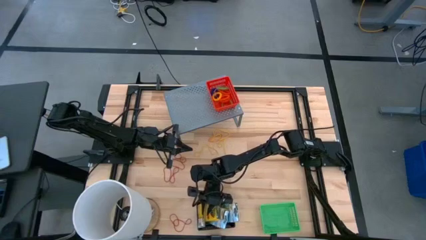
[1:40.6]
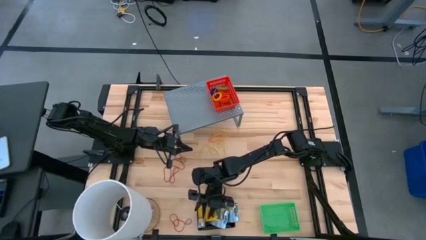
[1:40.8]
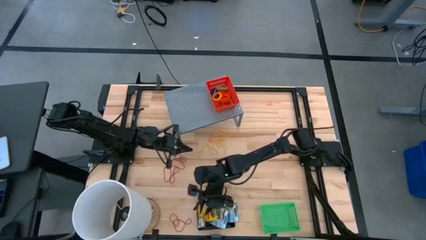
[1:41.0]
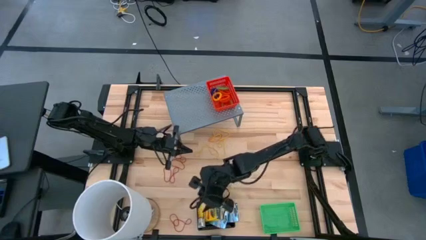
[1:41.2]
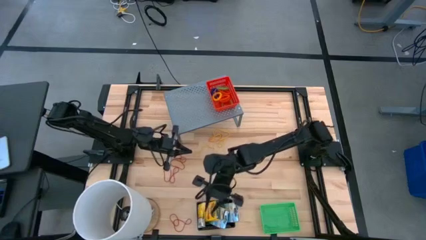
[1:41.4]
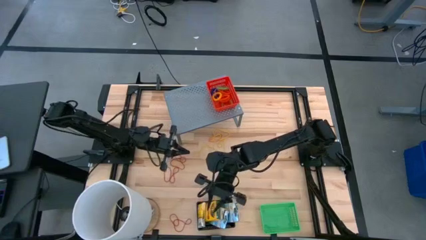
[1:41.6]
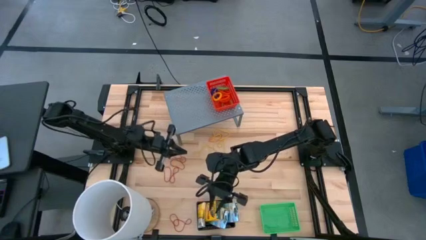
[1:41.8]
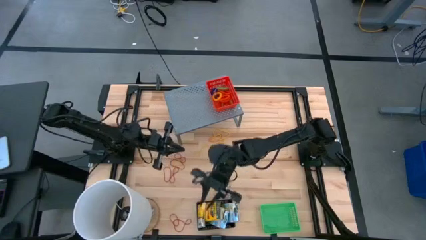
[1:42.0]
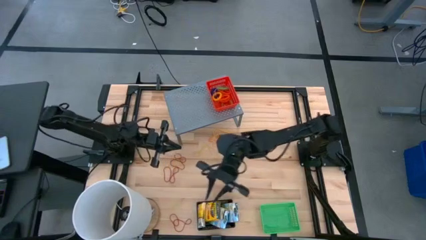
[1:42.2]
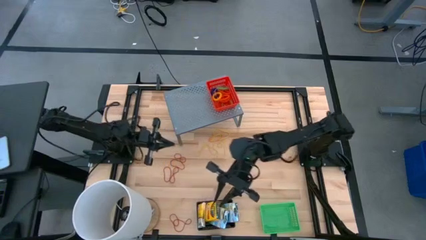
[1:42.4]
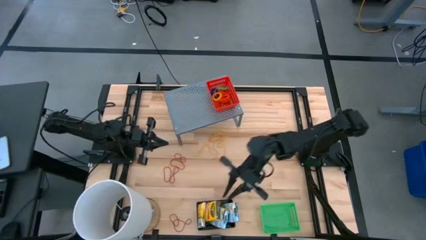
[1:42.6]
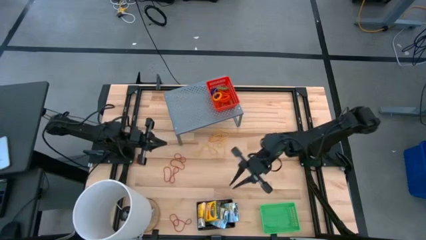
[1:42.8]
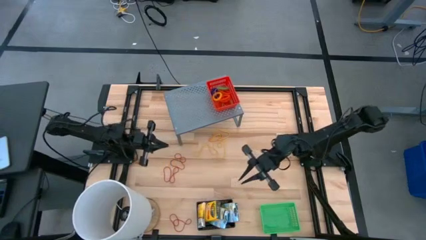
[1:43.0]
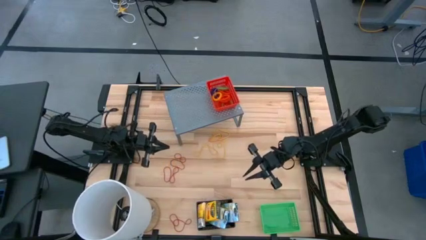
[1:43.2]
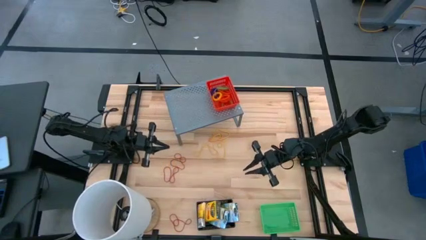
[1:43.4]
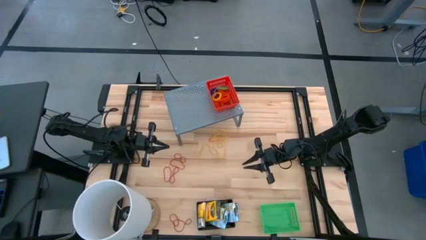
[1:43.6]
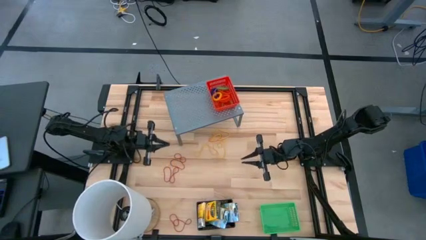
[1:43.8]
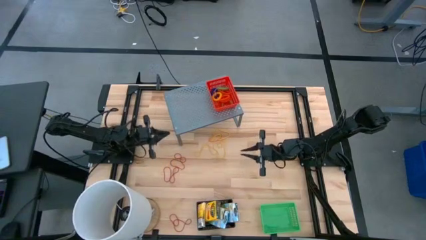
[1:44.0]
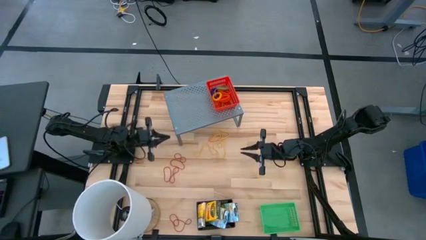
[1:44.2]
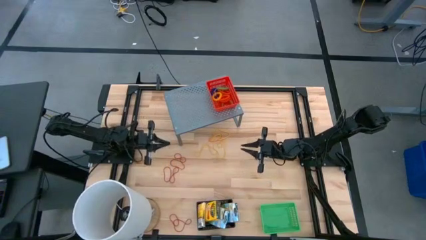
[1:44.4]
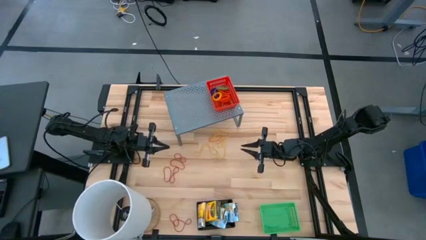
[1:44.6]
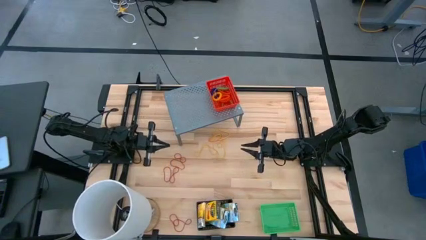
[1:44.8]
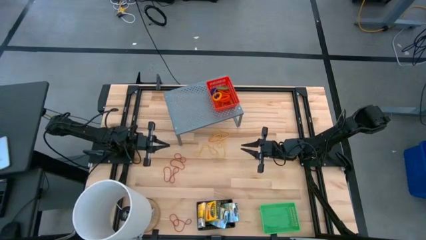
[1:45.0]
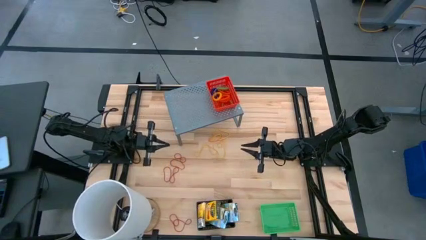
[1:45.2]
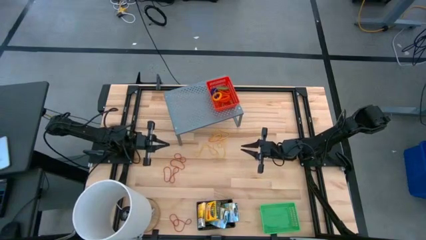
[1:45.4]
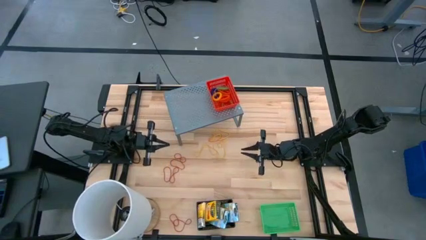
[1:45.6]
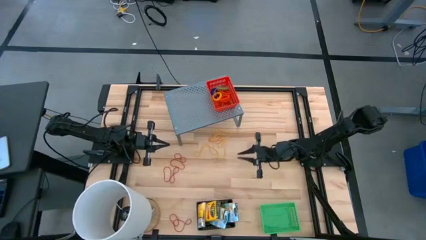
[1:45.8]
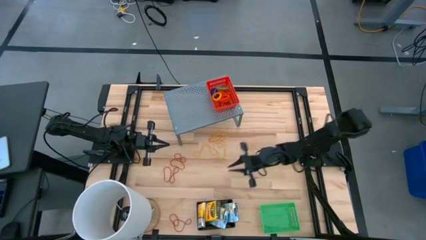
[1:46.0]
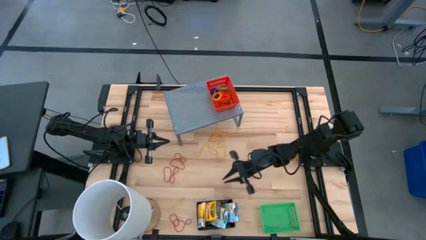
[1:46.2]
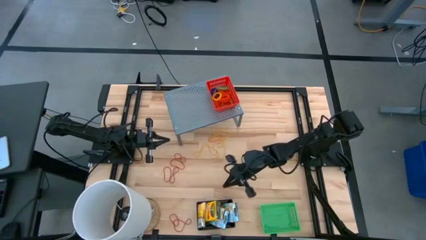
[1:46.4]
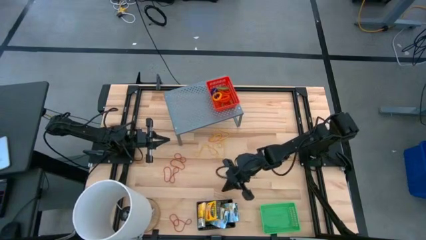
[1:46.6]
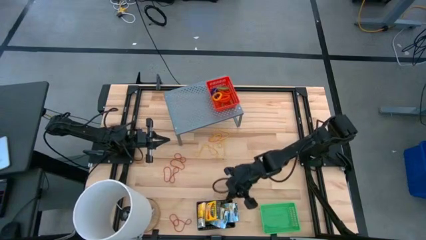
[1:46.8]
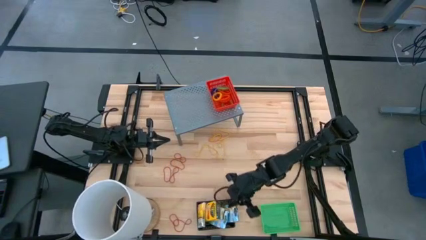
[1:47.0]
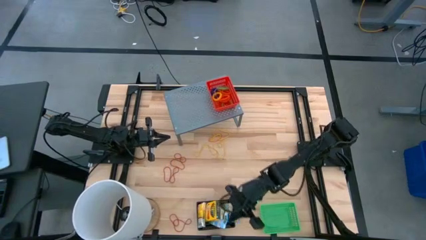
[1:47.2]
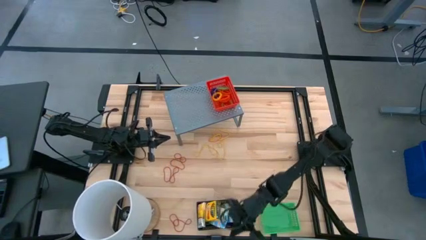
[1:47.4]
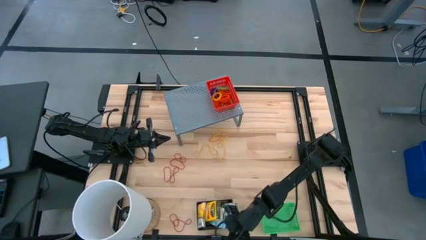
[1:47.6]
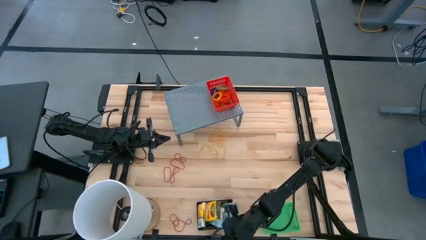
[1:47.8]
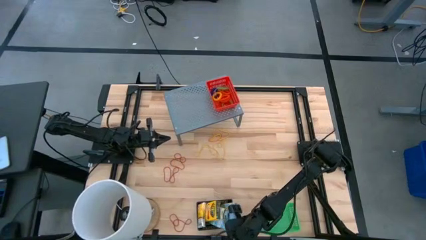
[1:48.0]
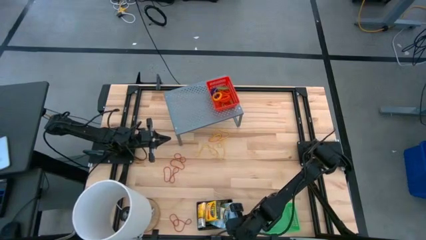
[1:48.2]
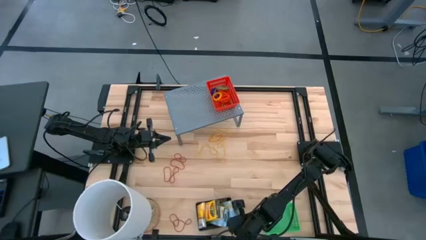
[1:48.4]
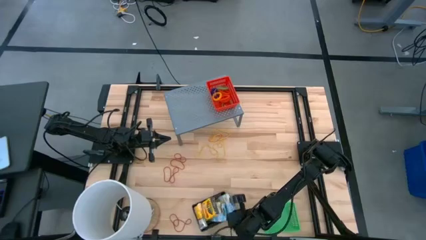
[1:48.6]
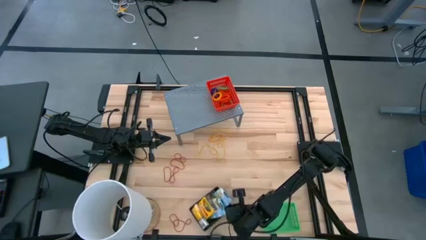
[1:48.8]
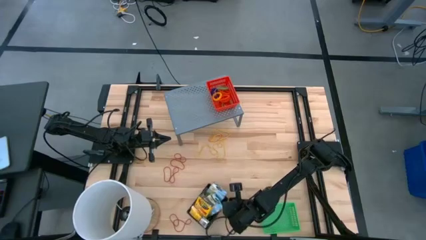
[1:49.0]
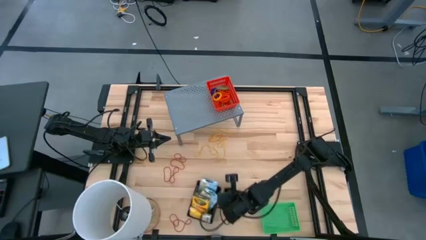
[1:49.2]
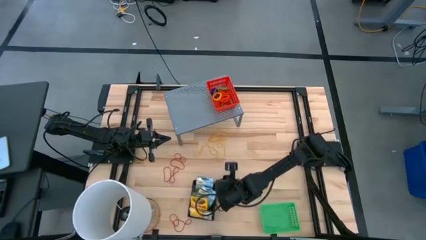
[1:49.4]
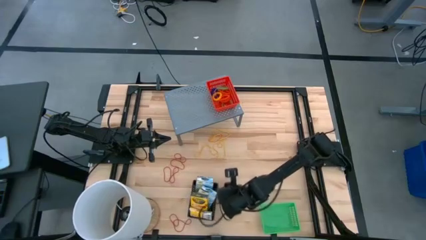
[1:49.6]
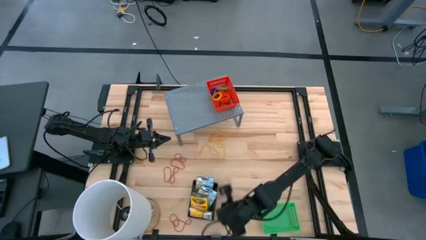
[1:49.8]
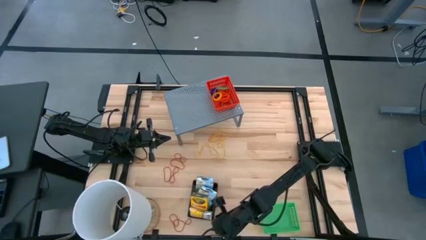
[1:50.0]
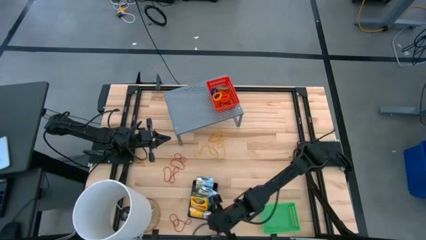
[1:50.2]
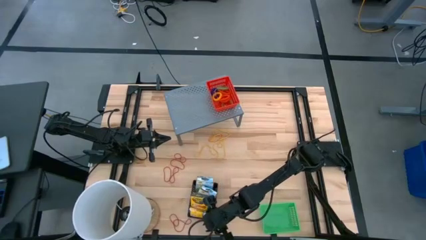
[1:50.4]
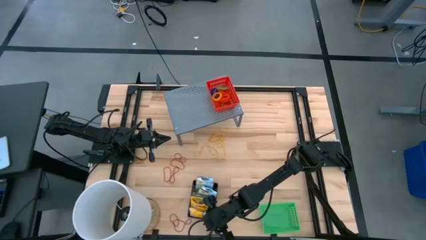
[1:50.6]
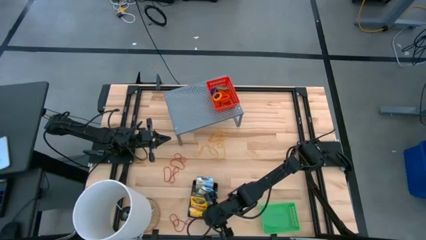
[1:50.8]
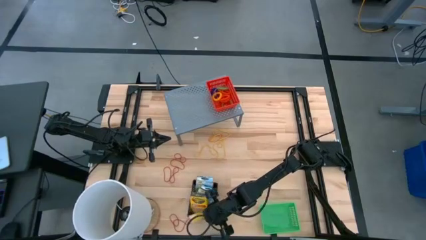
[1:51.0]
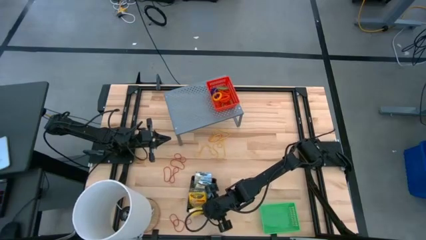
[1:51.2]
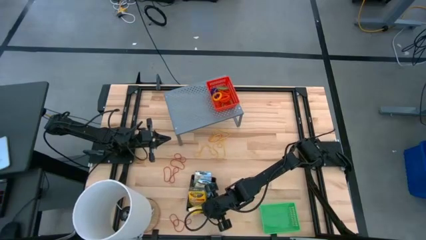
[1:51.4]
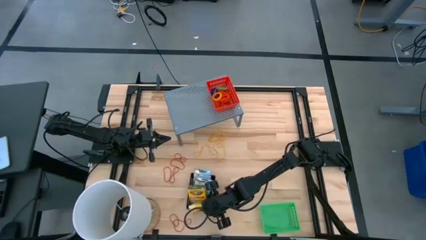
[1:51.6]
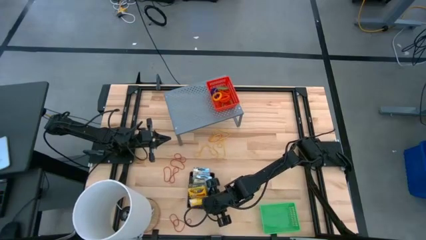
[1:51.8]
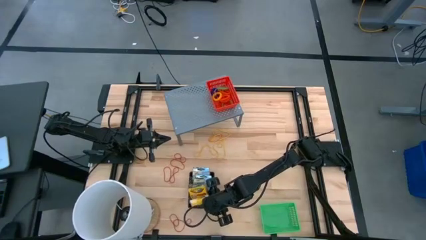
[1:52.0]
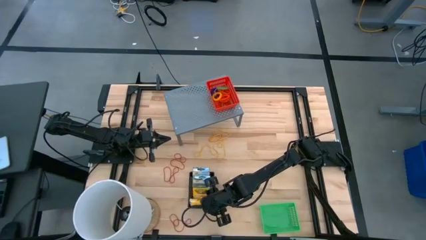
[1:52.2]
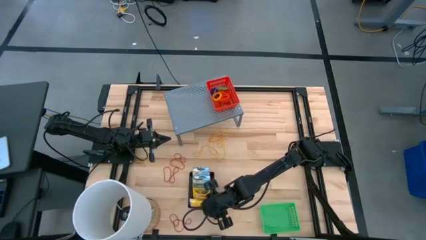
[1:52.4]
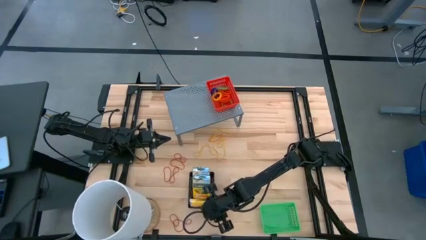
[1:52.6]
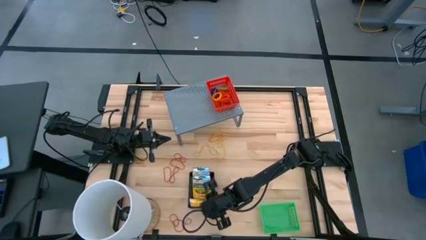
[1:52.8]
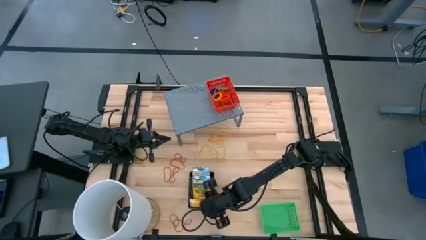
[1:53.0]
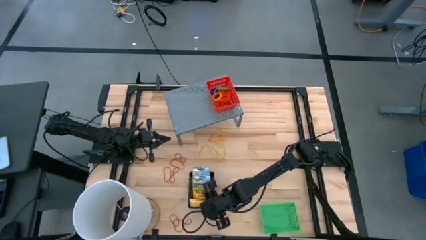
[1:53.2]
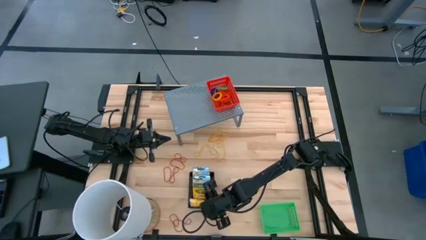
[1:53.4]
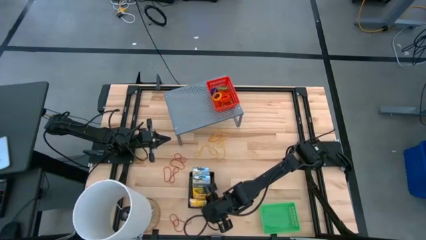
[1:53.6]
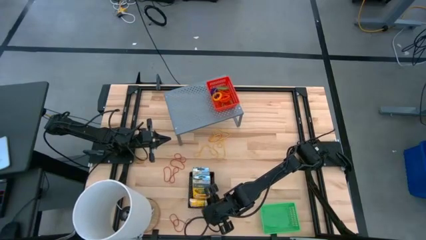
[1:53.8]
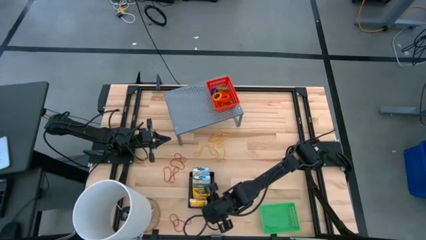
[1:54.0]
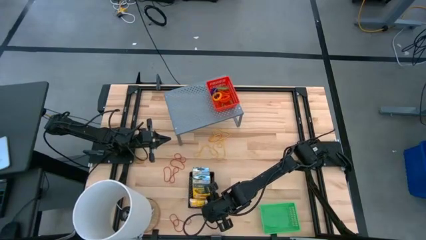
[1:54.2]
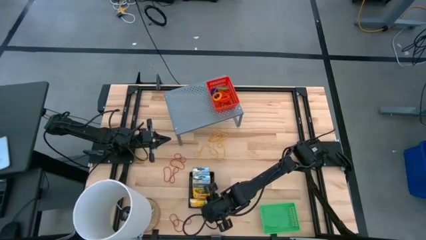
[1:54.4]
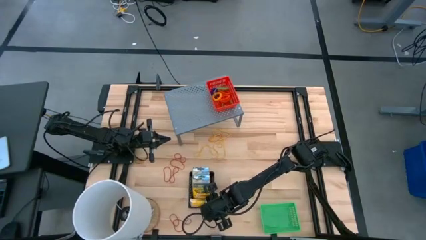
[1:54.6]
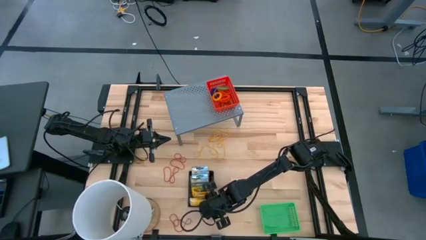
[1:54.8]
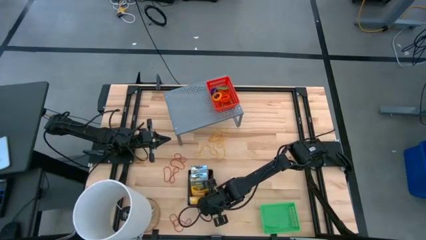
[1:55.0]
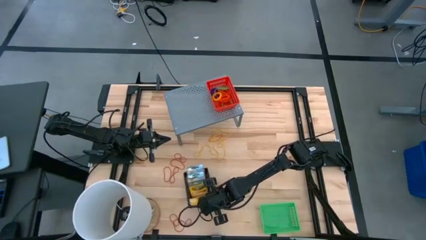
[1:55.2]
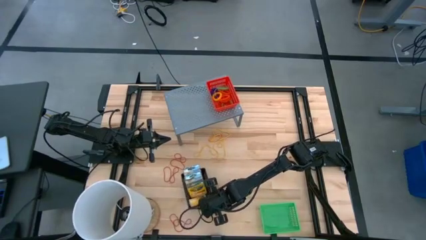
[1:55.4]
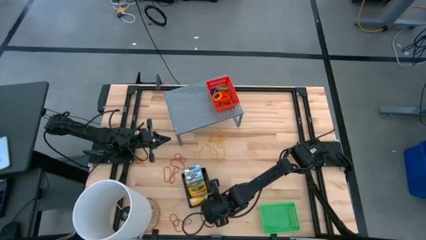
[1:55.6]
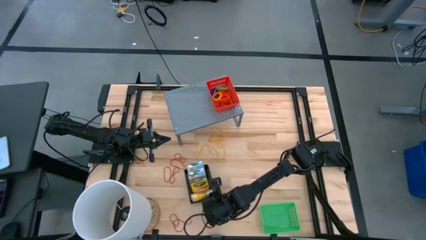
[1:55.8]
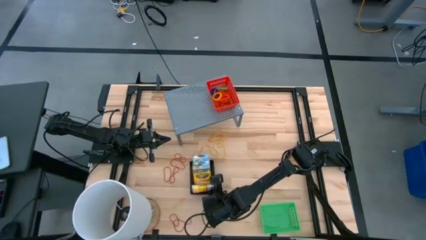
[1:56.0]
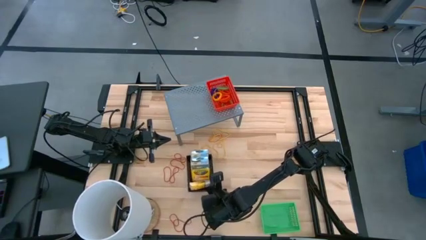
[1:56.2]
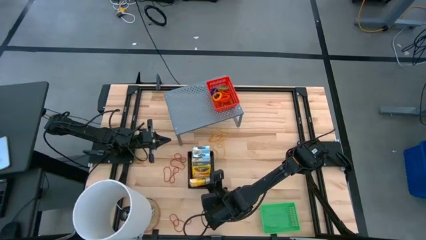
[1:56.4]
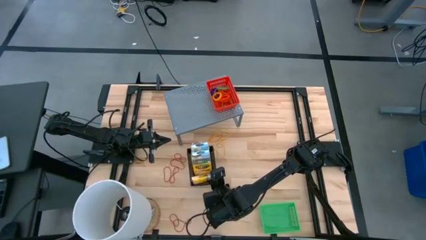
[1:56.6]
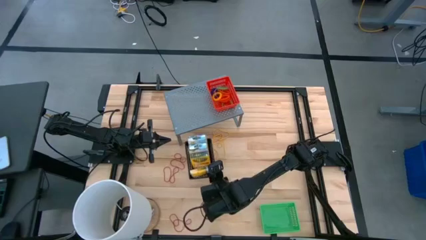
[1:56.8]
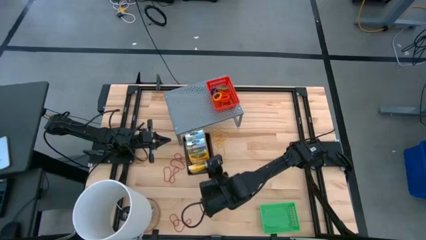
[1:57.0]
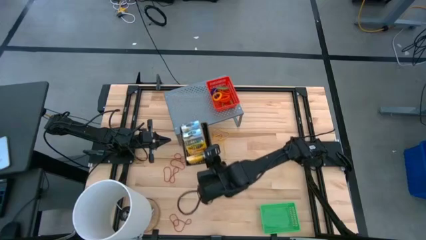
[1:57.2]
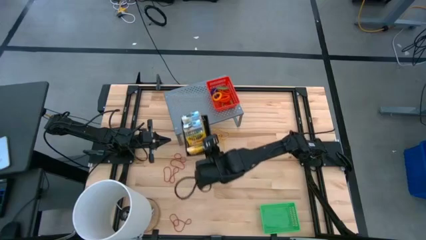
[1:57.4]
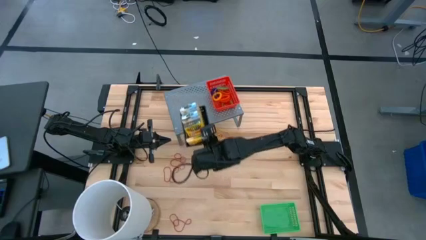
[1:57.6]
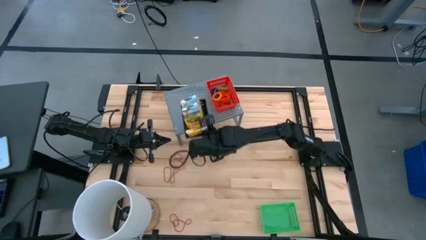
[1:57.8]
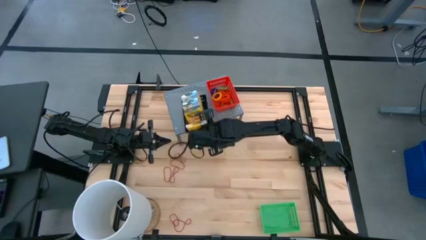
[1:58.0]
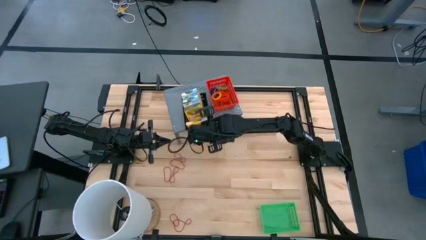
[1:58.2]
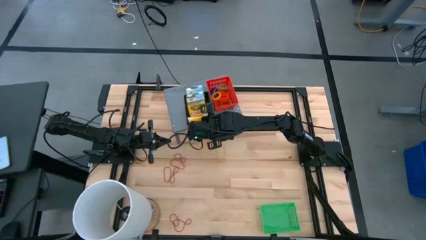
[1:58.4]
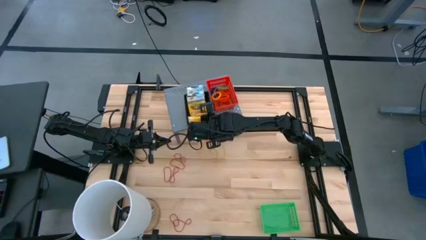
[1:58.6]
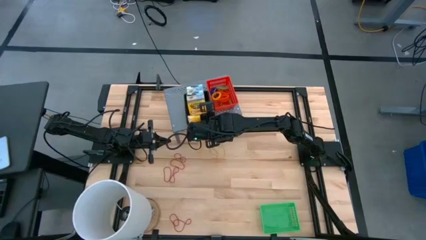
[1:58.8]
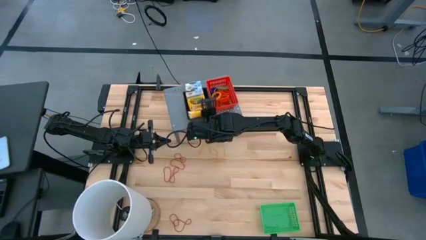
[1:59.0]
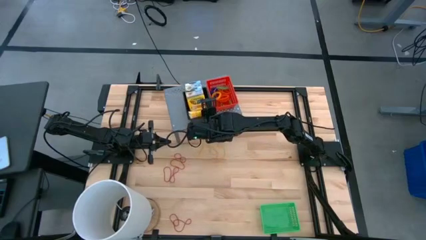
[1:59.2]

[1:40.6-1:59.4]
Task: Pick & Place Office Desk Supplies
Put the black bin on the shelf
